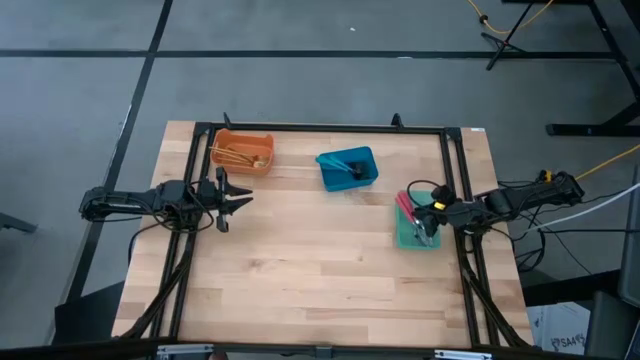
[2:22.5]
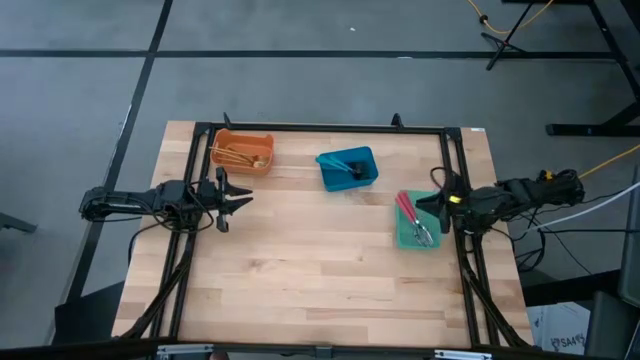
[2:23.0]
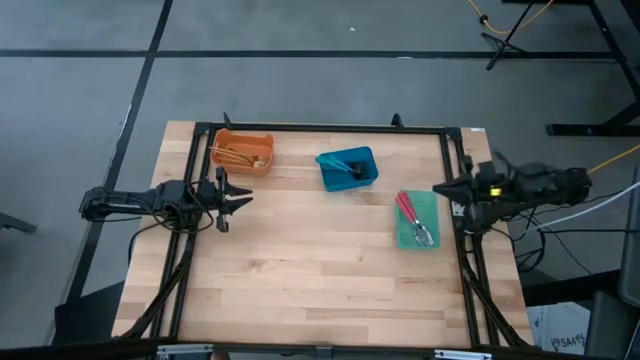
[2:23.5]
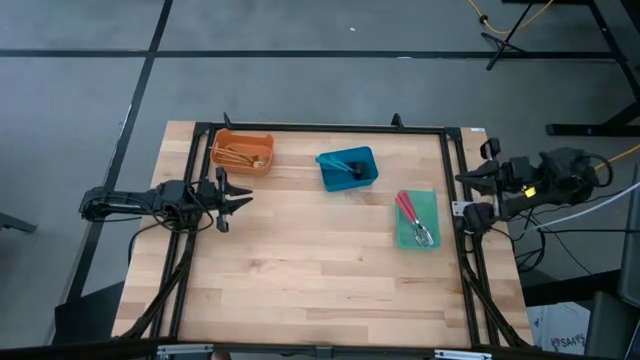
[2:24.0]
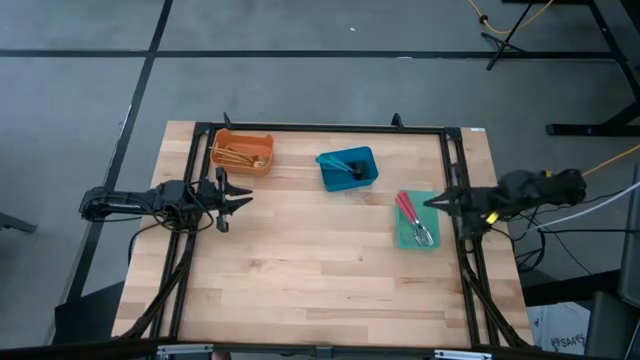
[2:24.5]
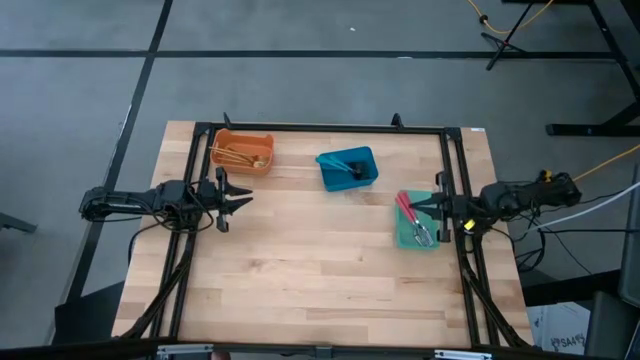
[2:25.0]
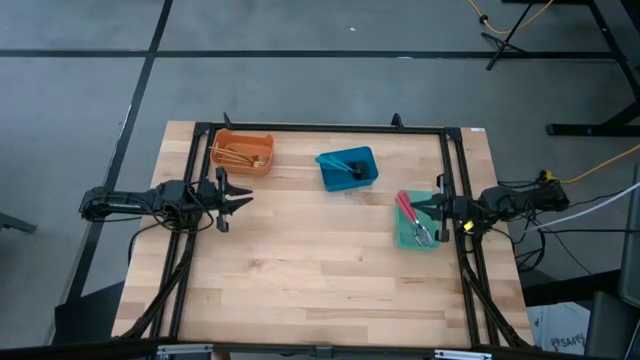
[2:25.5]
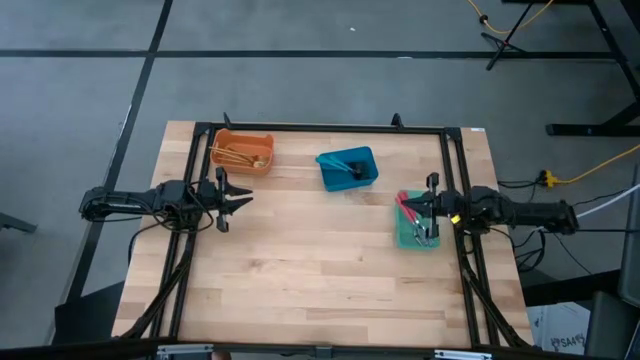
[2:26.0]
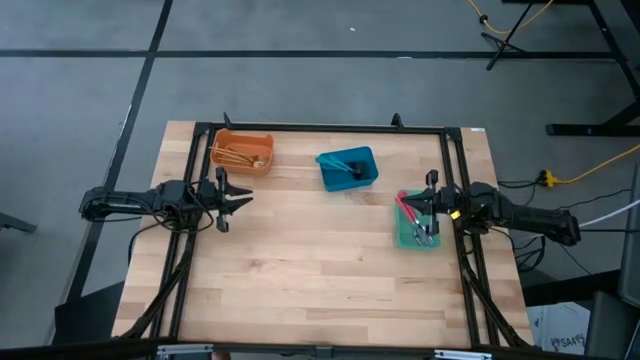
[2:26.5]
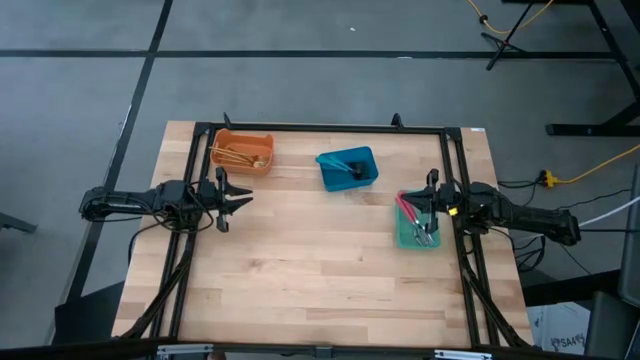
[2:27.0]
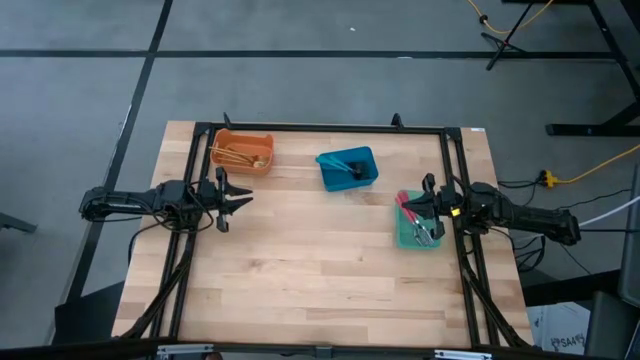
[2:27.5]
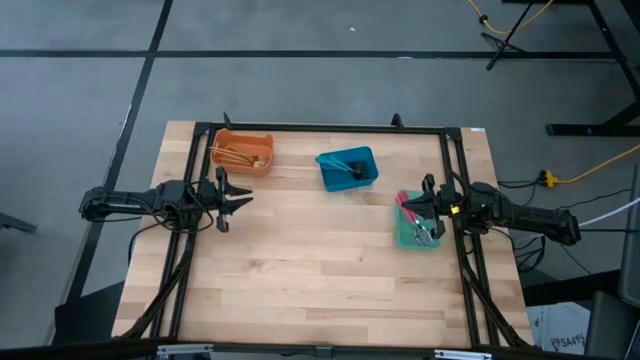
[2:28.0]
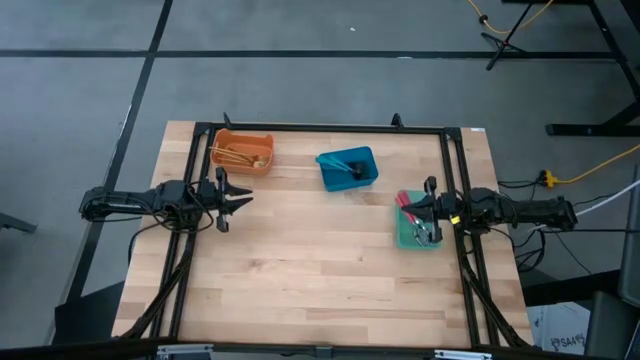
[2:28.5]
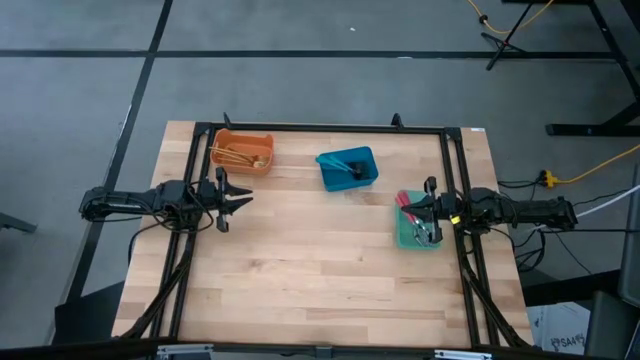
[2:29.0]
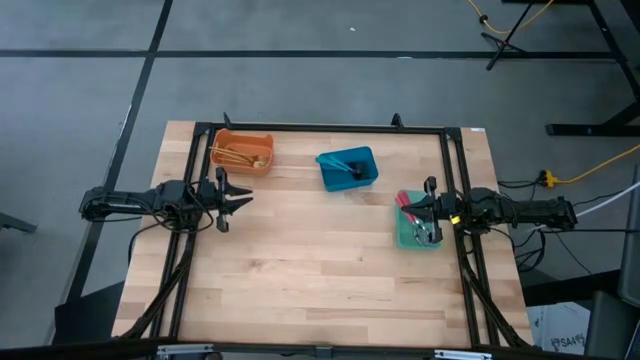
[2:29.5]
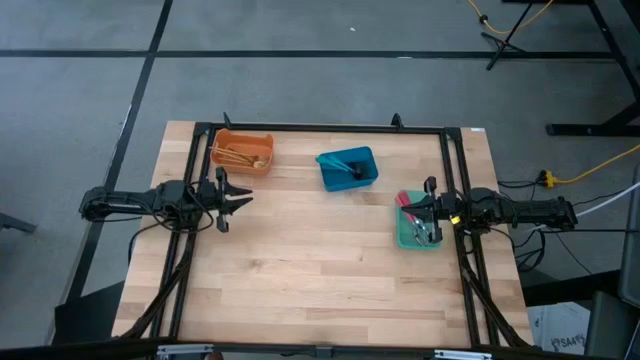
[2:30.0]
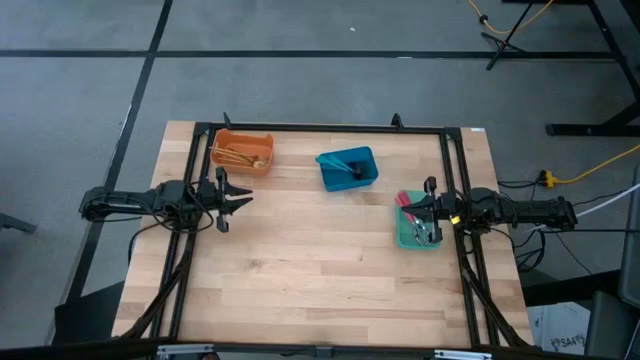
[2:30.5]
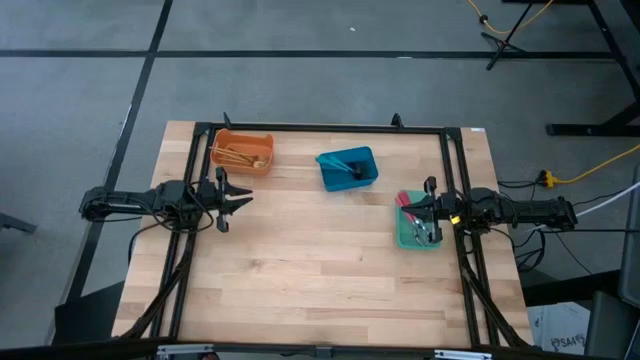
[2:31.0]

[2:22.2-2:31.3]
Task: Sort silverware by color (type)
Return to Home Position

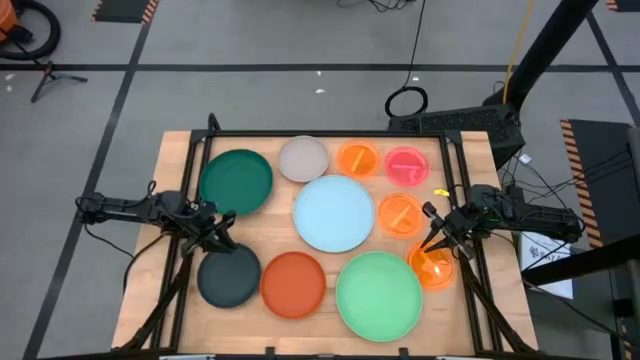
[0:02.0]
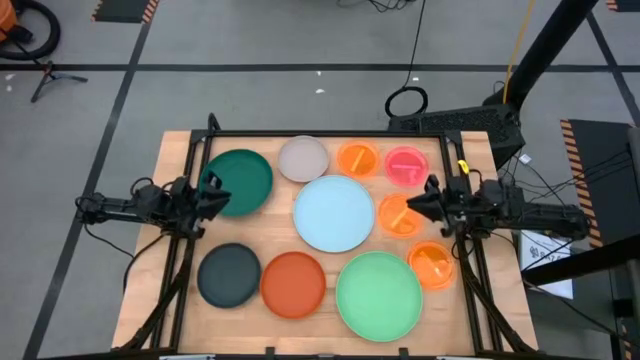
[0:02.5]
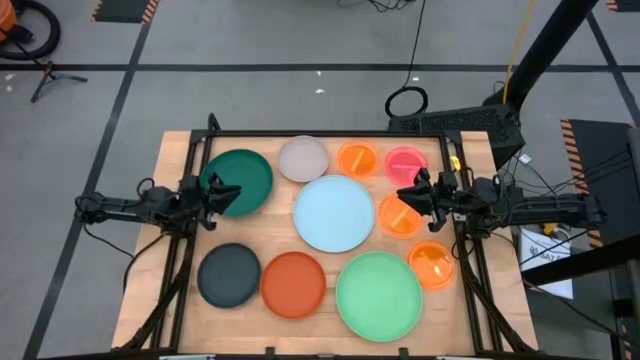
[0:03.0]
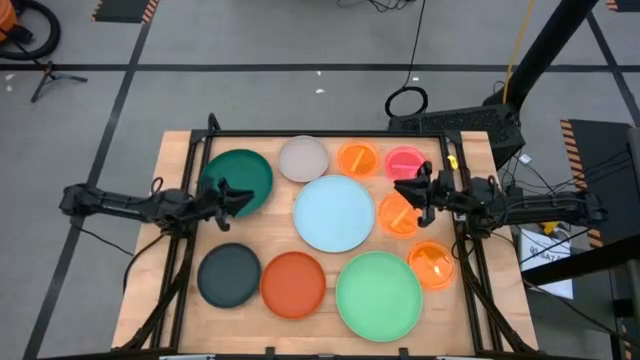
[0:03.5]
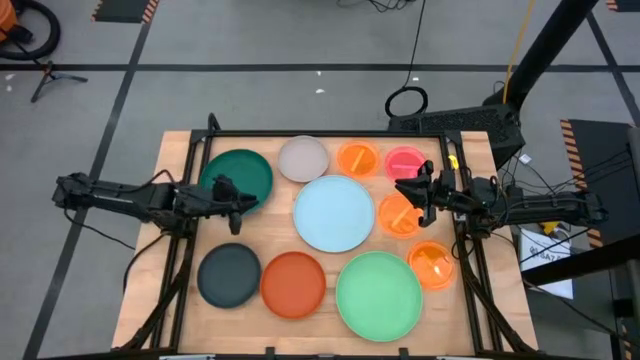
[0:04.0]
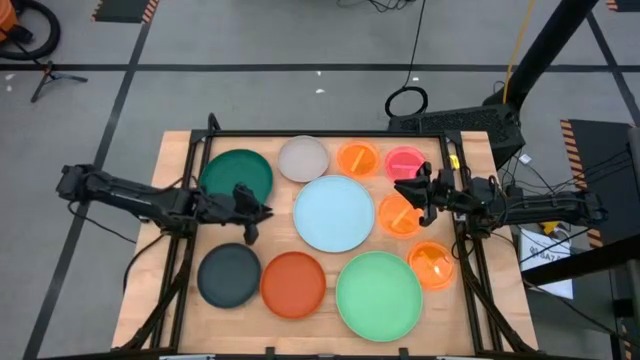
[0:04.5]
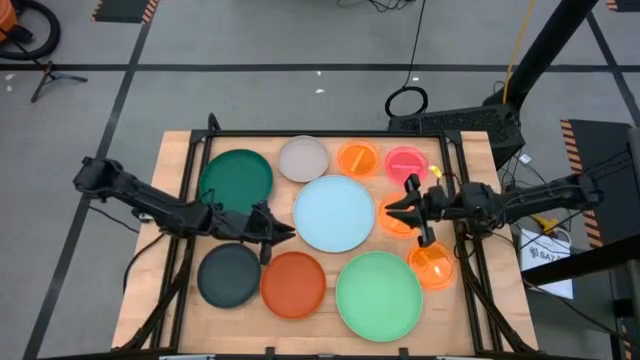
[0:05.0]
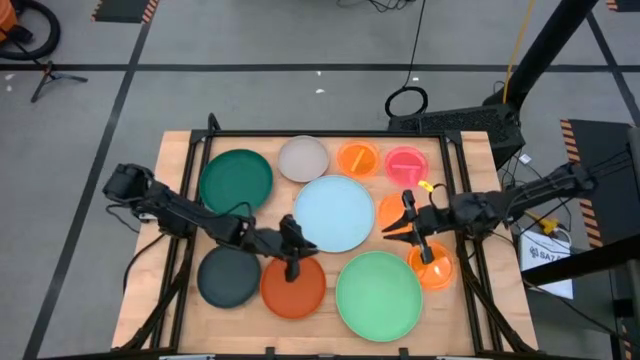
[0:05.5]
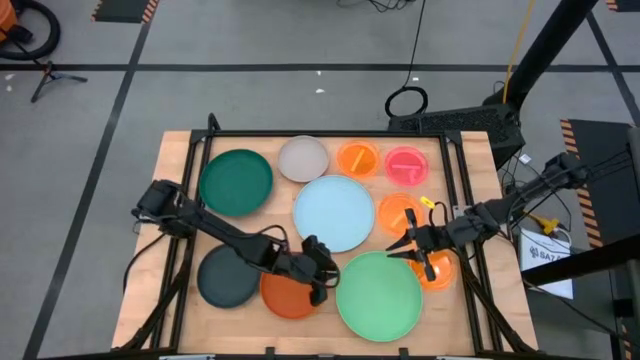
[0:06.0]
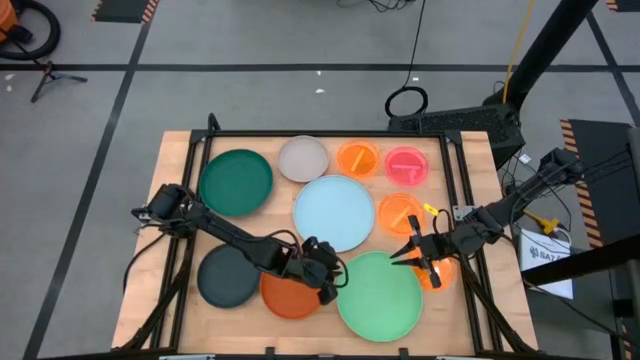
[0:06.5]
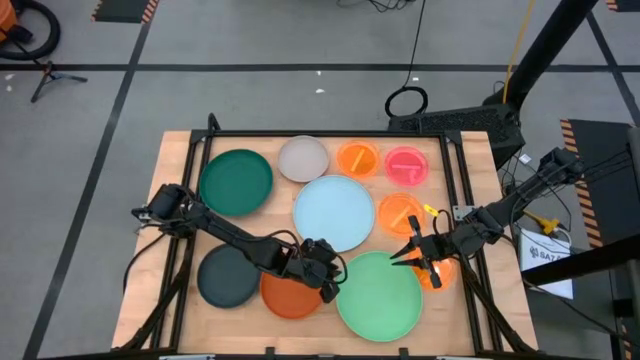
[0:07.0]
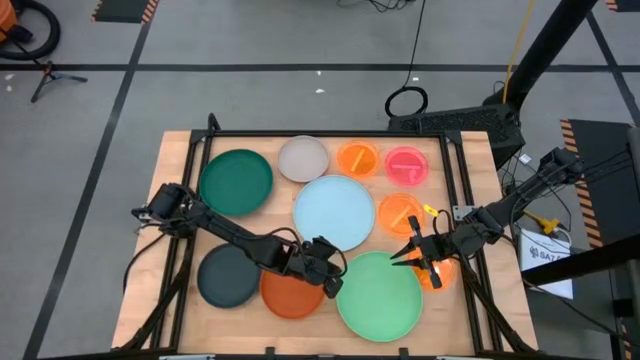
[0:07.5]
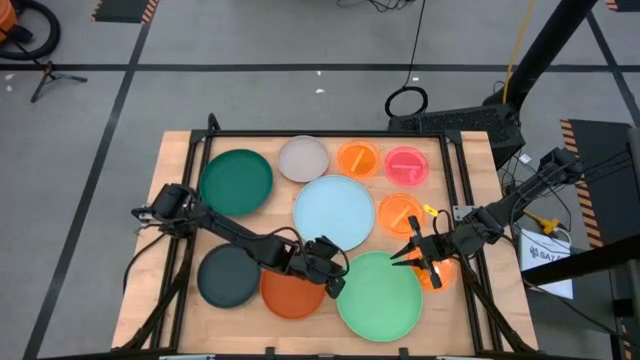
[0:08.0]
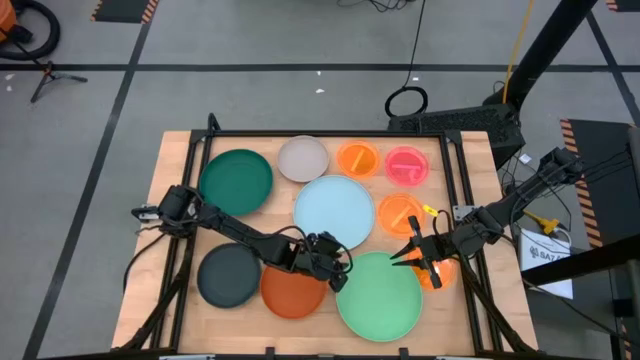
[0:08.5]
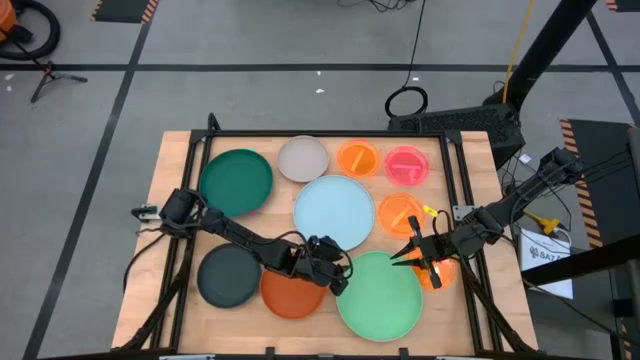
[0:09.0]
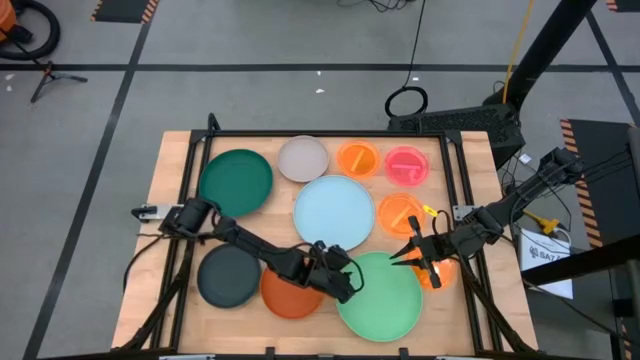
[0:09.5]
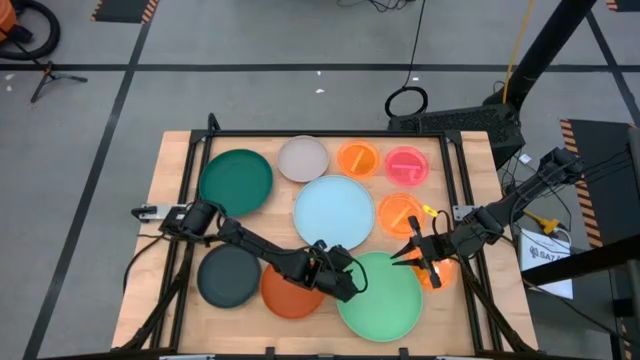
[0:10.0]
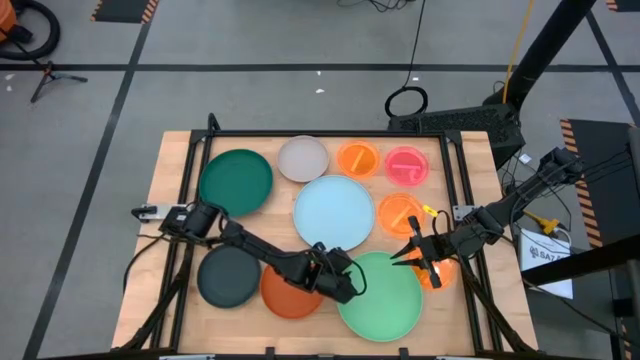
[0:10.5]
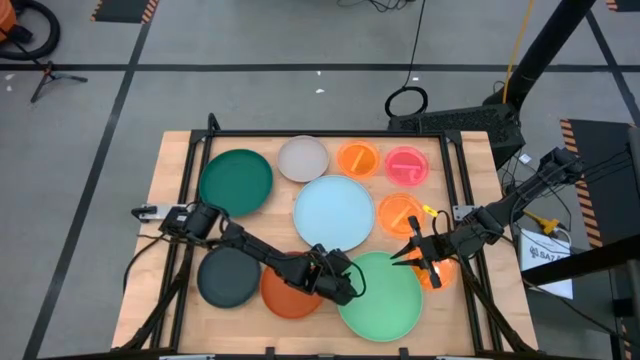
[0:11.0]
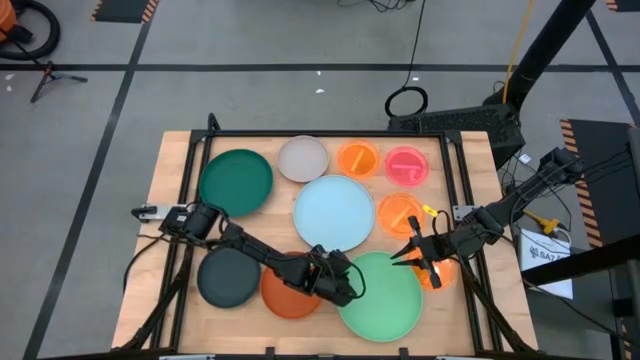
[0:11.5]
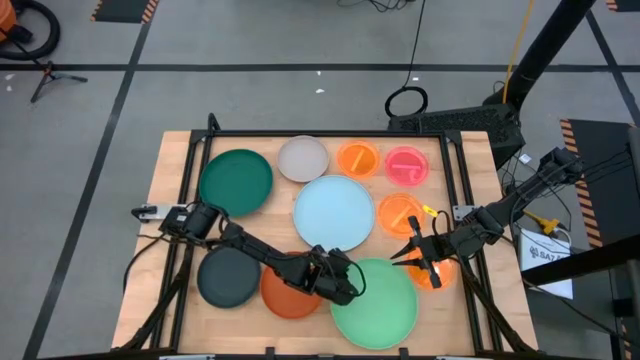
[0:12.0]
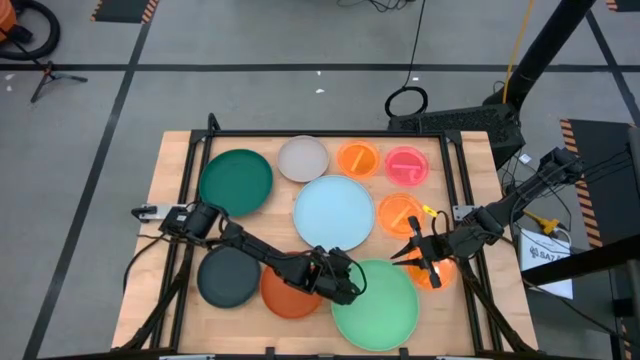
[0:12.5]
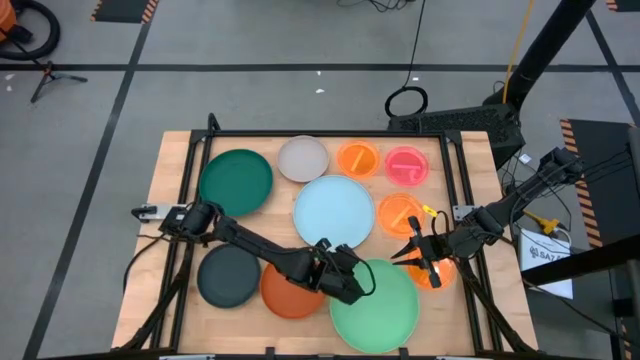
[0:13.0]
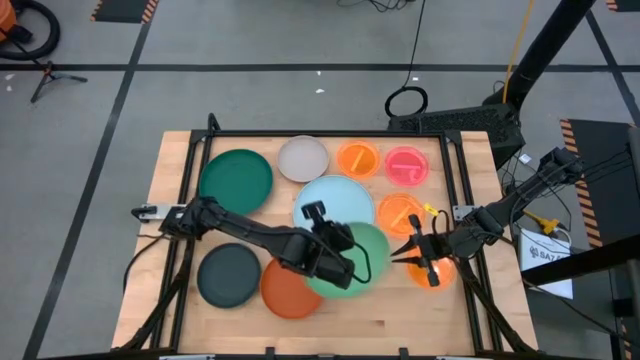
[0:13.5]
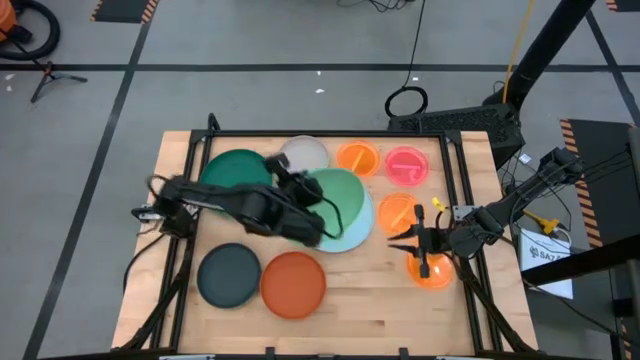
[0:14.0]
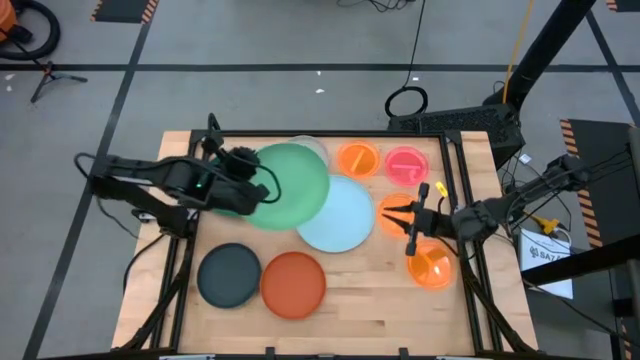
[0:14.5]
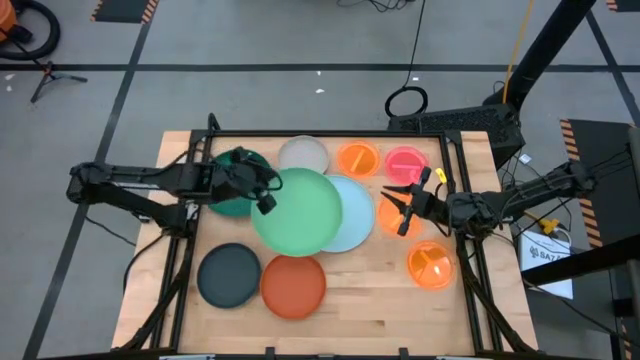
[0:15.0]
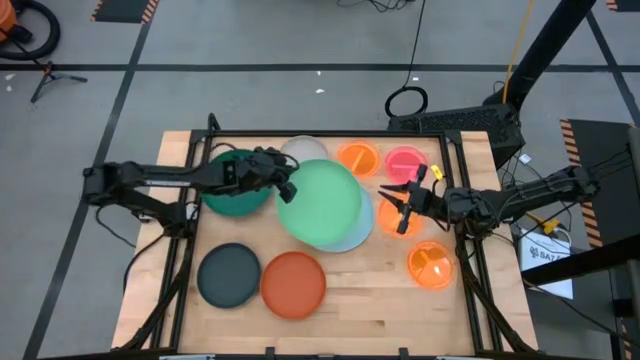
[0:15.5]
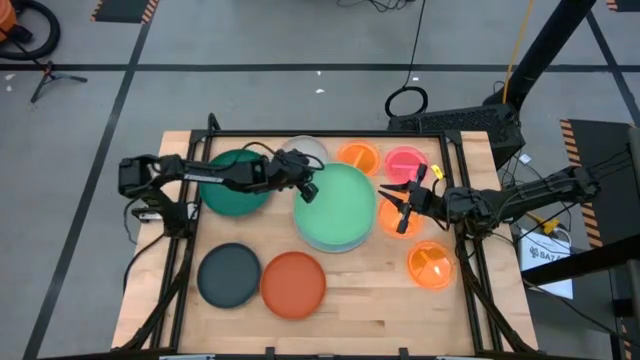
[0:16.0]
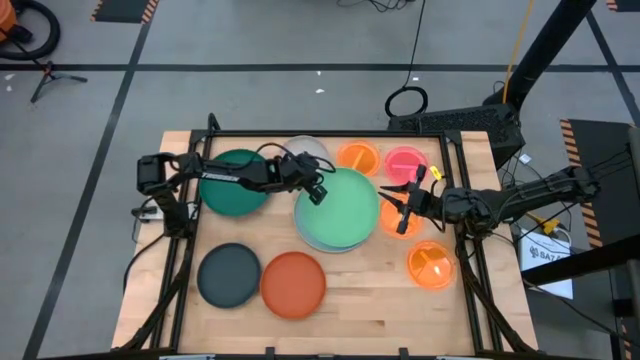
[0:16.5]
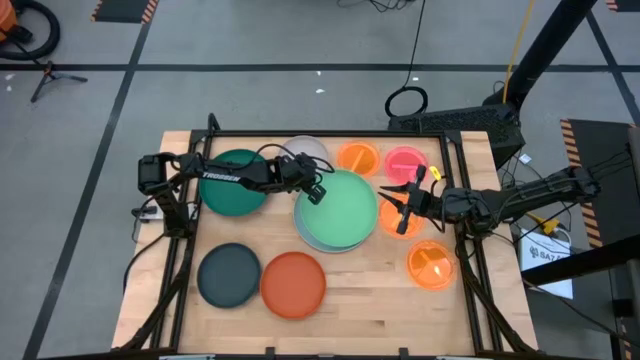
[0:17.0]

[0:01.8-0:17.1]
Task: Stack plastic plates
Stack the light green plate on top of the light blue plate
